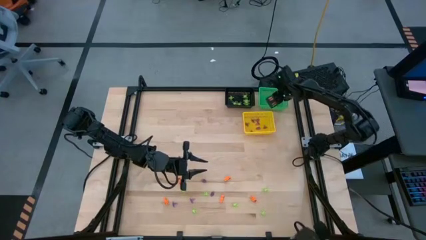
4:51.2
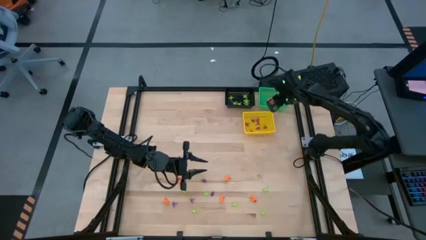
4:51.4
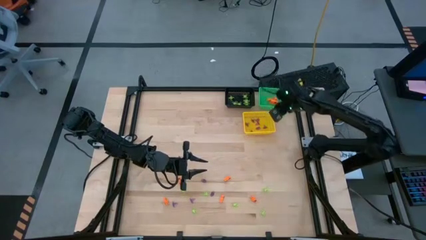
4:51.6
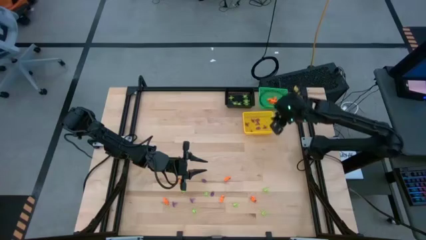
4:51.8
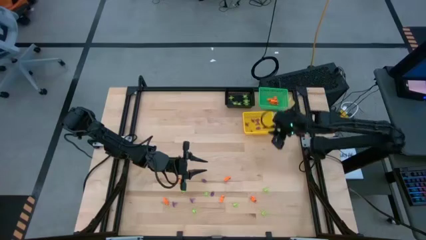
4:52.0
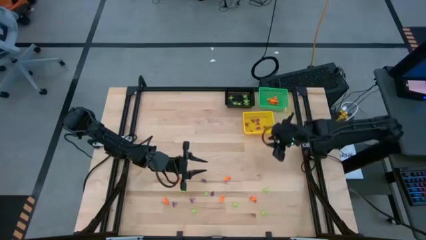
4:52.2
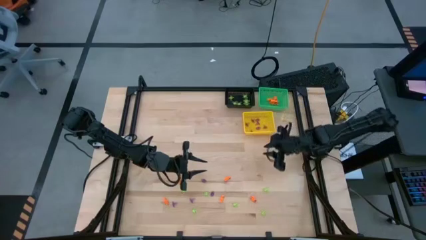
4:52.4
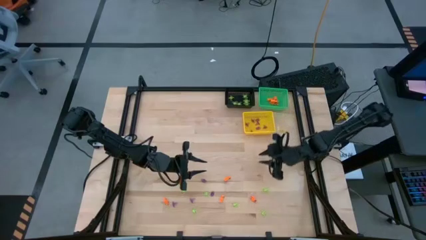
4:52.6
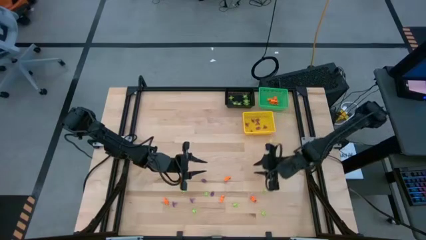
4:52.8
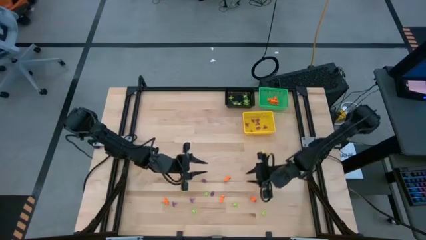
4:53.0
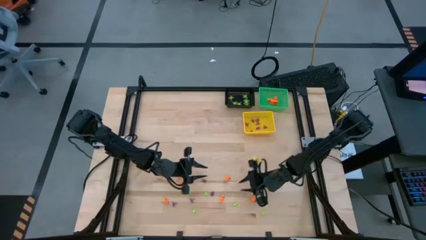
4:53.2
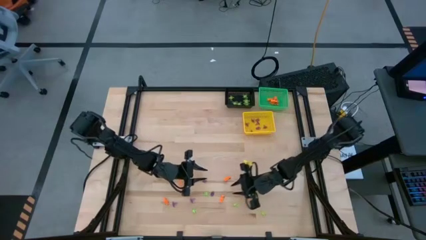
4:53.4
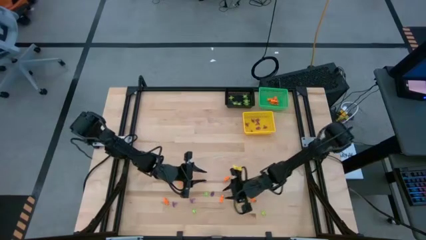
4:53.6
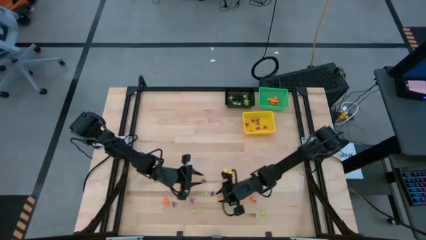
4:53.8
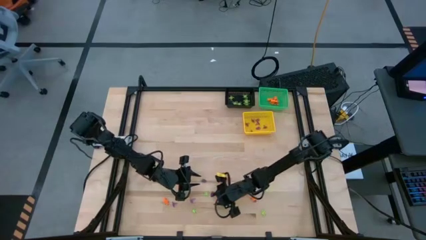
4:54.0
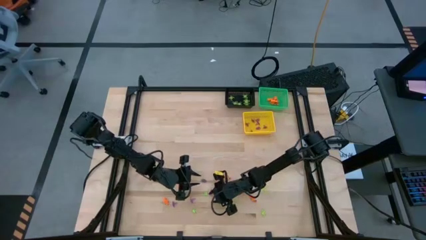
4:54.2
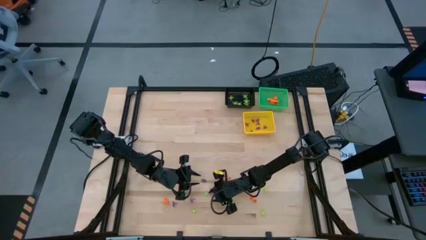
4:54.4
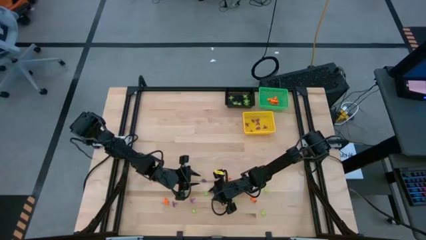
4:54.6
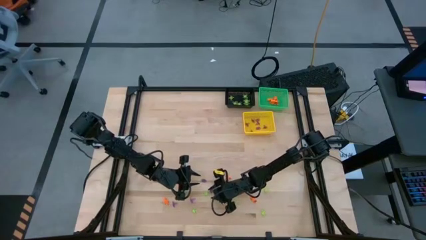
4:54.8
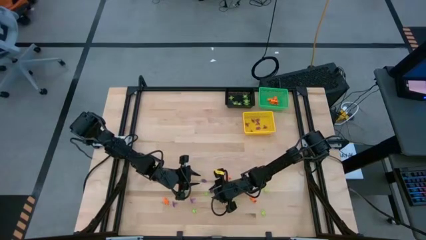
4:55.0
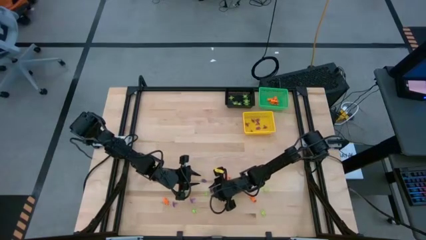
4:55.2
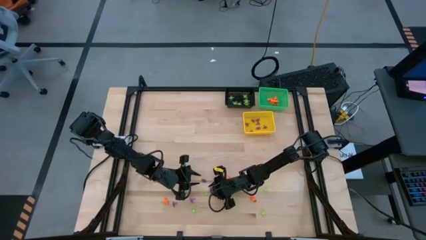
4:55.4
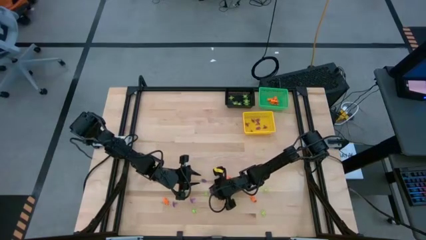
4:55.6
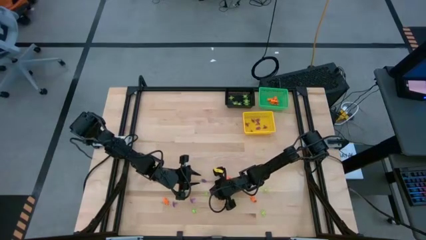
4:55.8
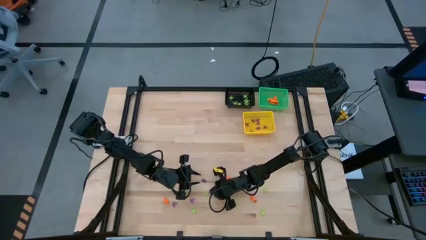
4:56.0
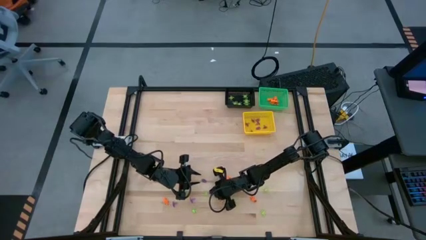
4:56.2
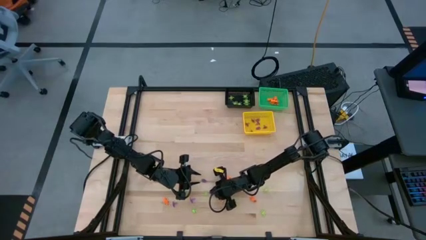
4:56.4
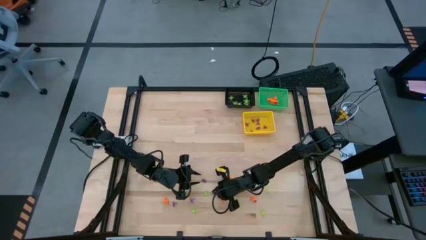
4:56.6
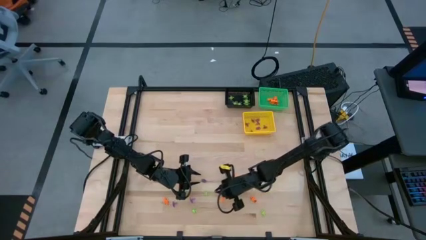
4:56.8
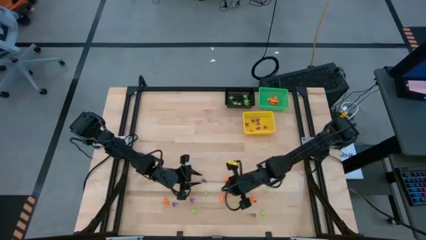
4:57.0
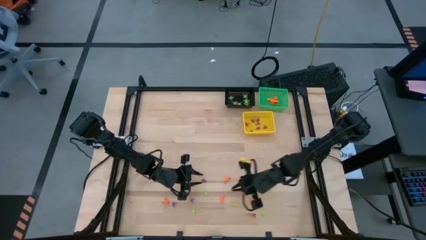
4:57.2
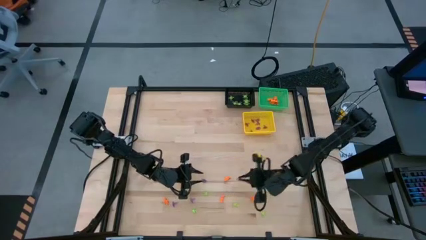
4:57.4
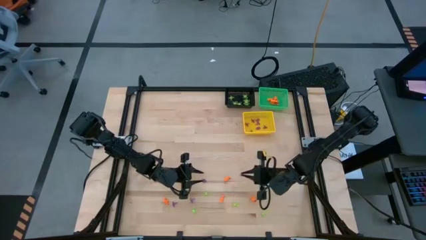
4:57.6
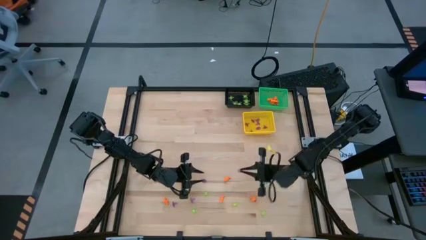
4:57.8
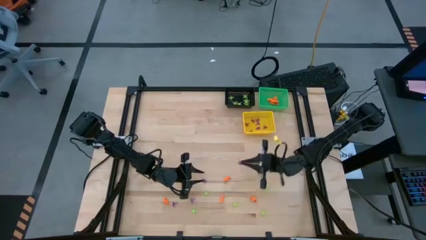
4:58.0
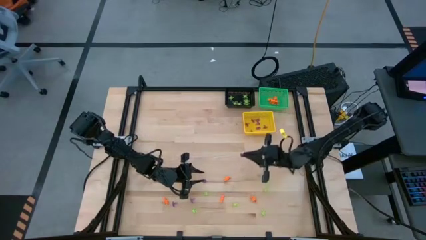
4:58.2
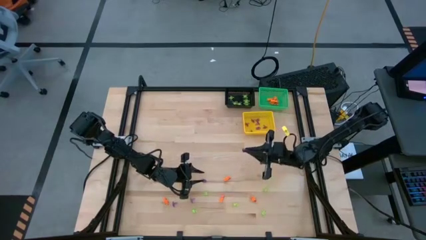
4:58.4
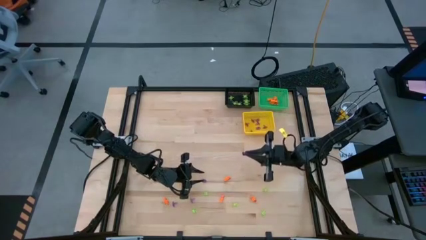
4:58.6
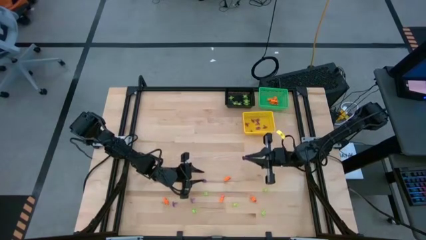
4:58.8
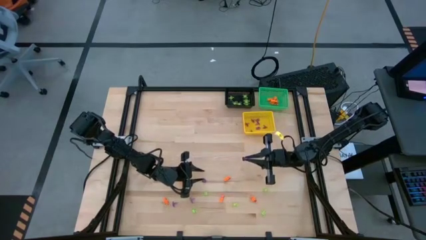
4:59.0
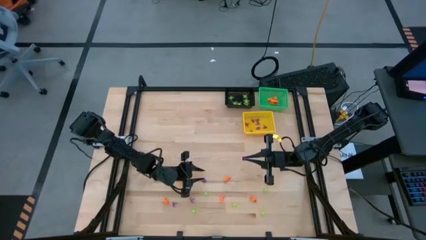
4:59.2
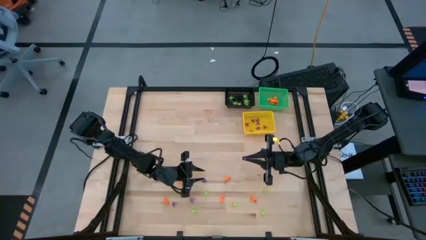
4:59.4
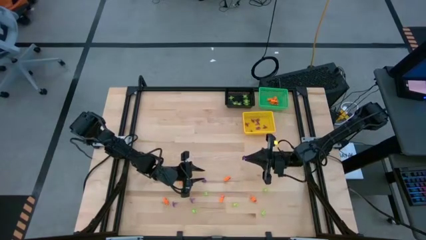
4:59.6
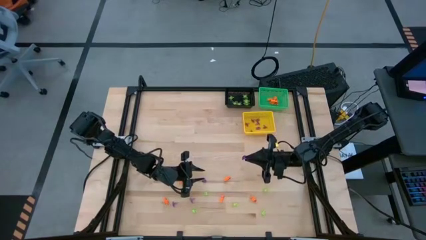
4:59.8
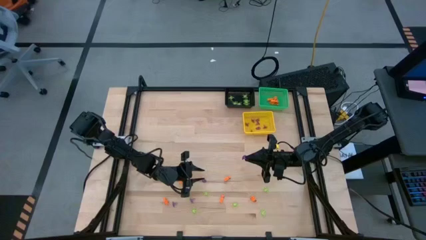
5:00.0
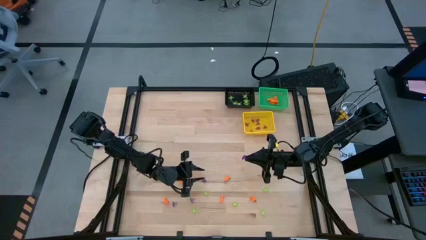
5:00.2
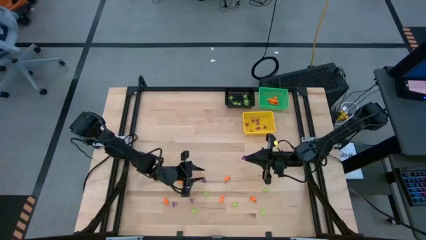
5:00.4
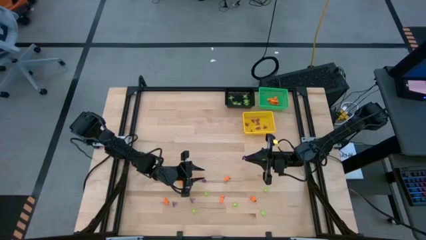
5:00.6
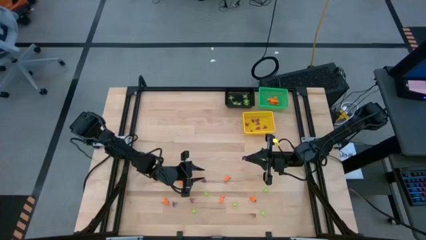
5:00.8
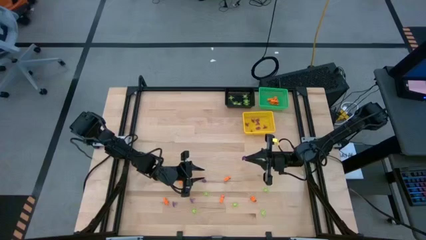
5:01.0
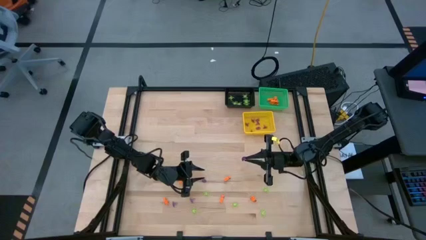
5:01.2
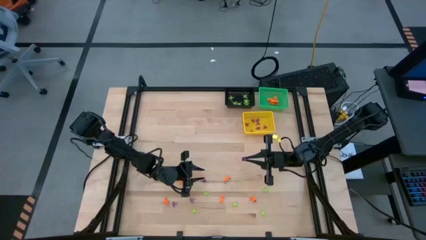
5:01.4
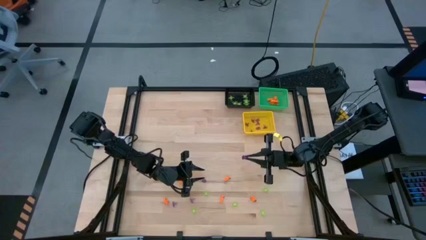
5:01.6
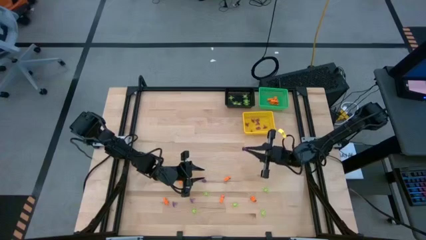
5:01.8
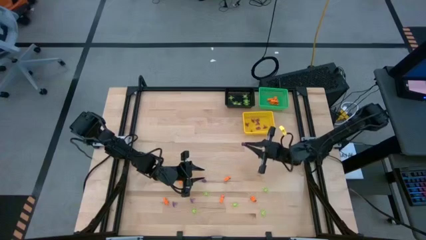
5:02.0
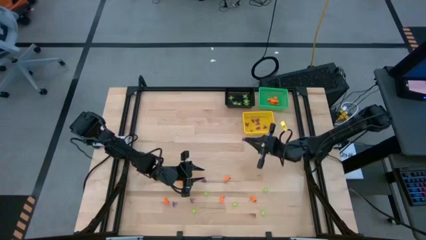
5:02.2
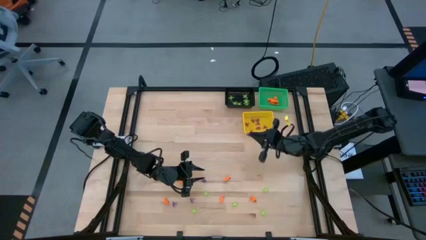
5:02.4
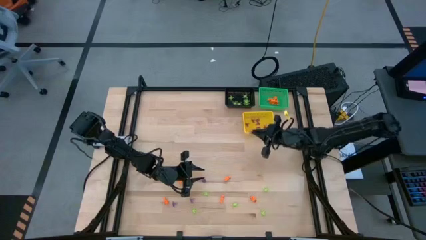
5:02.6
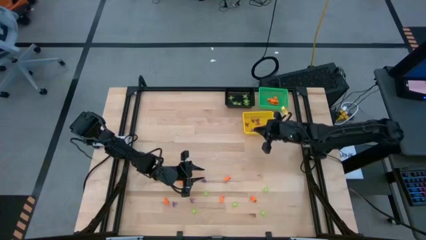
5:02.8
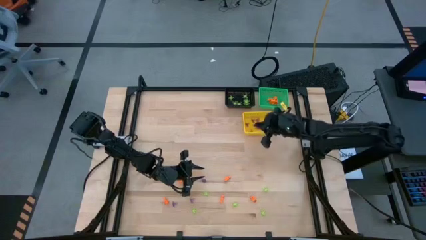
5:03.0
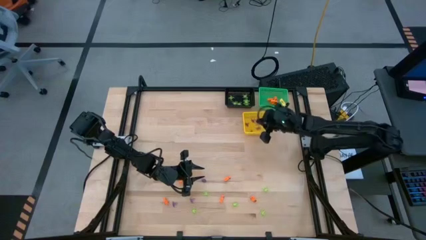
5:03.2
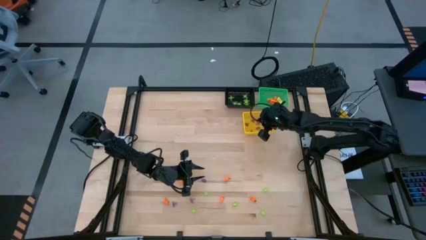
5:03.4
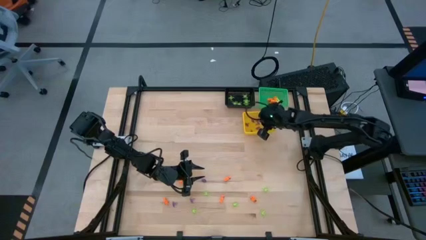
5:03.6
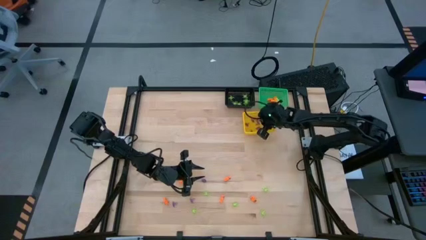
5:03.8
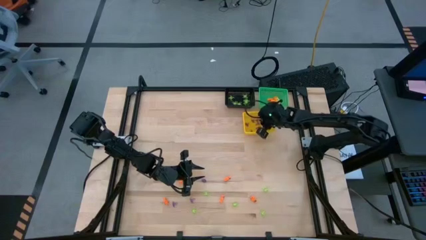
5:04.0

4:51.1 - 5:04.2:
Task: Sort Halloween decoration
Put the violet witch hat toy into the yellow basket

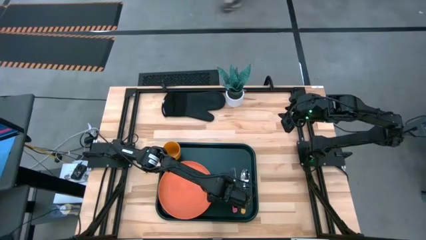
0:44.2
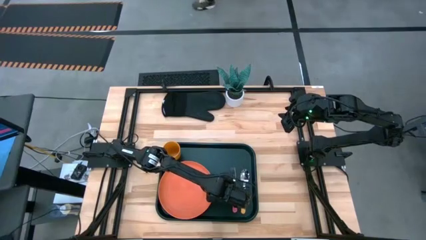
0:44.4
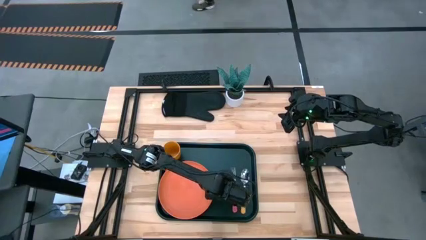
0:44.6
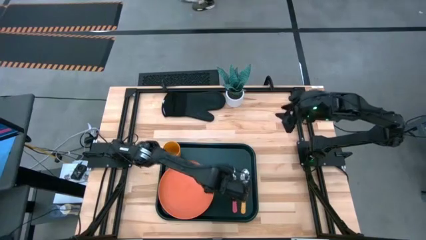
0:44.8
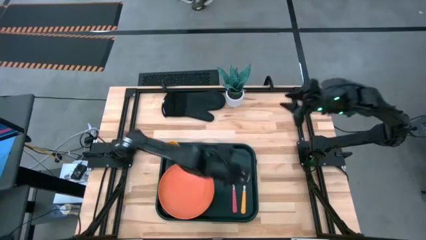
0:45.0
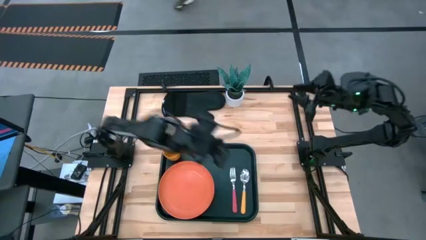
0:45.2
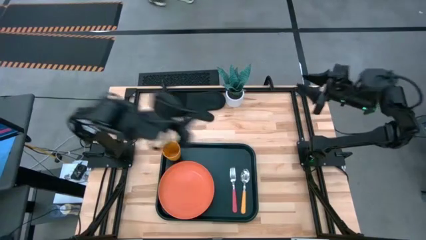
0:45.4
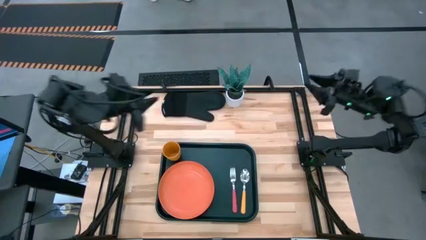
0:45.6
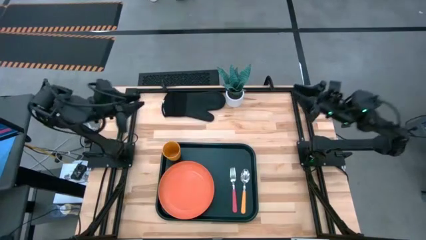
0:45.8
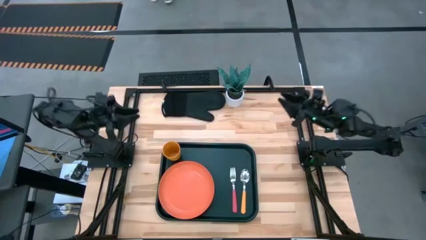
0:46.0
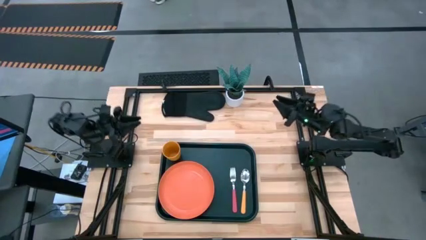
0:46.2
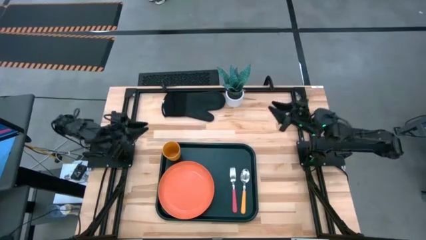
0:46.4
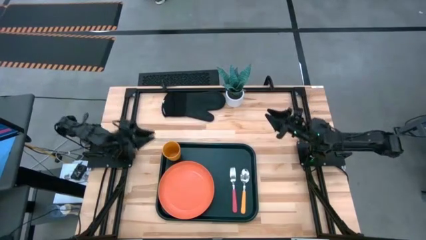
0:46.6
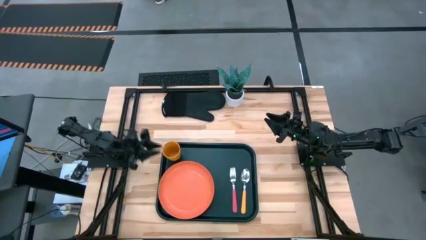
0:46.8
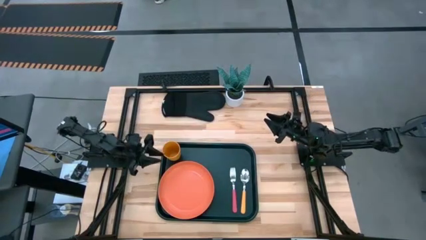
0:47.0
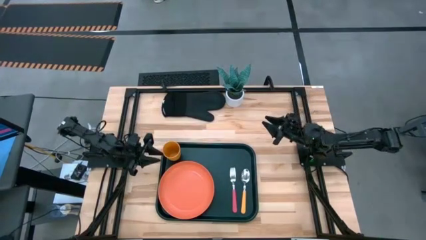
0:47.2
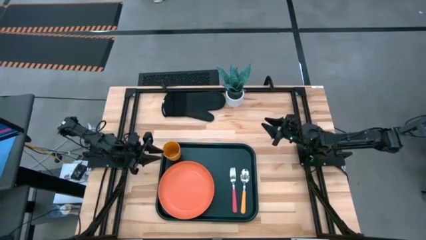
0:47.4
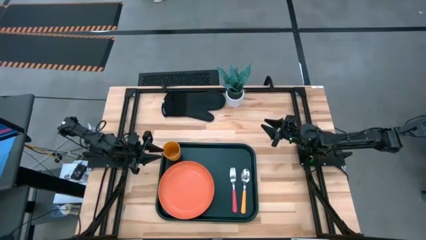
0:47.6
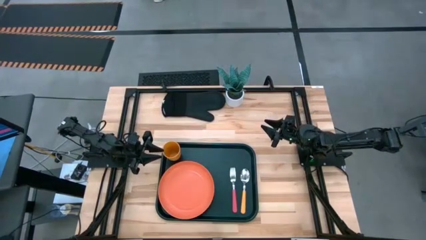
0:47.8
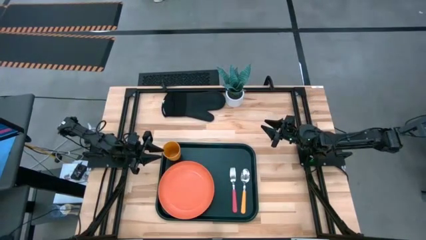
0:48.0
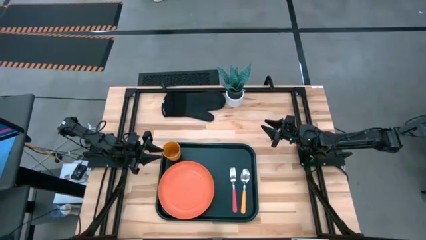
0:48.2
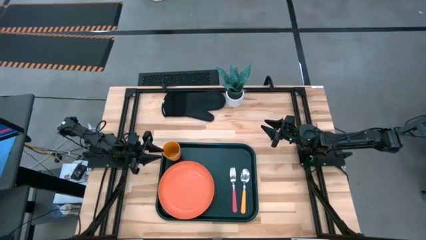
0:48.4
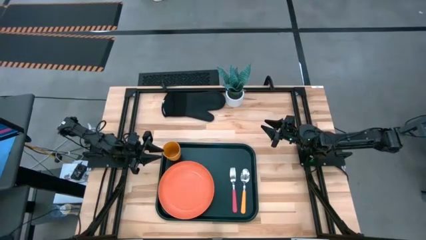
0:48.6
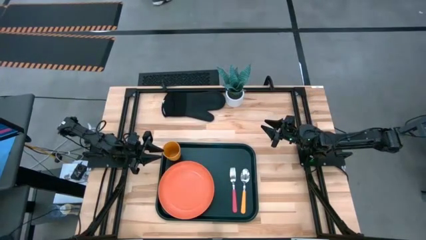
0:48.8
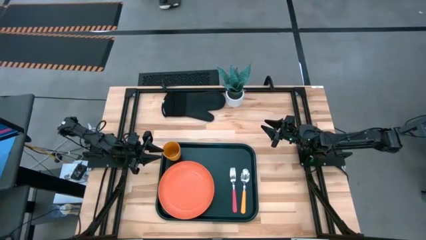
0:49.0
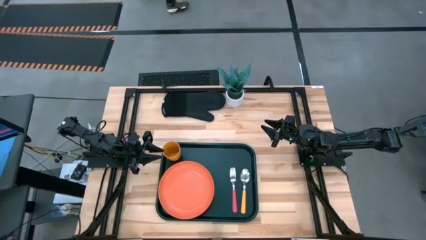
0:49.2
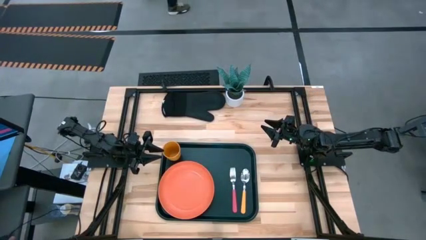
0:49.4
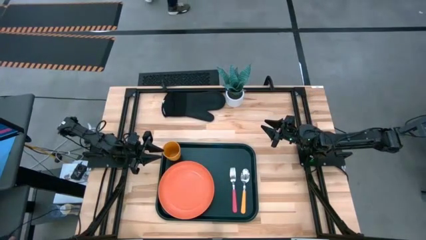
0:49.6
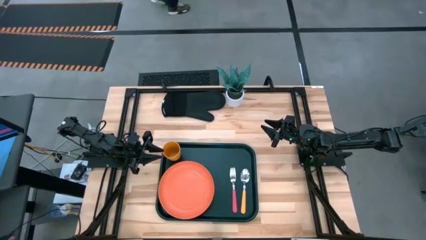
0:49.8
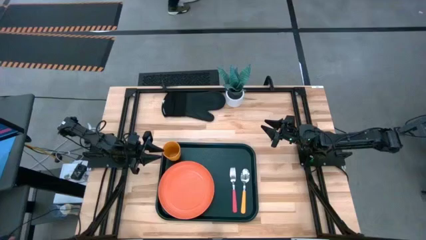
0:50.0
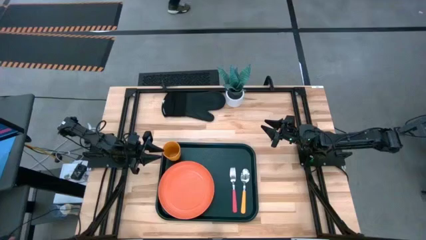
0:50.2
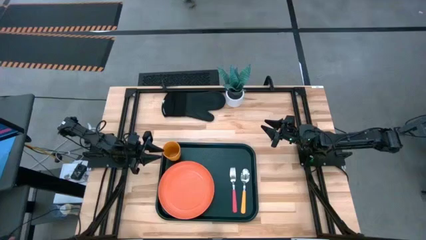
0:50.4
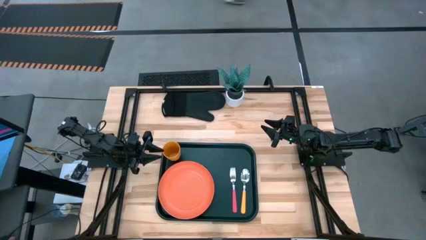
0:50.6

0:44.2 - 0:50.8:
Task: Pick and place plate/cup/fork/spoon on tray
Return to Home Position
